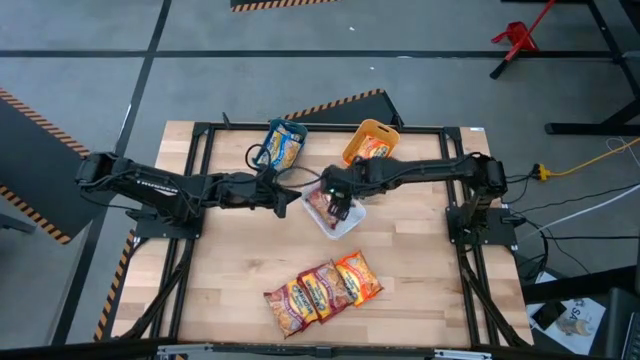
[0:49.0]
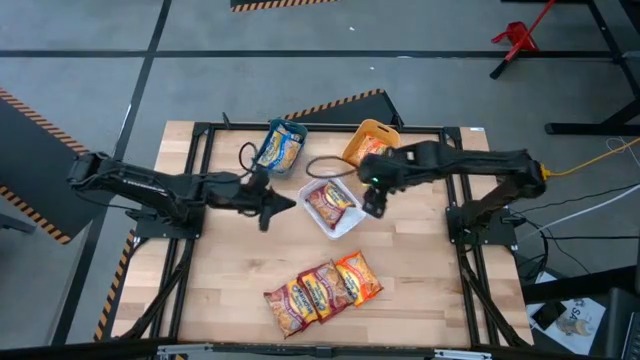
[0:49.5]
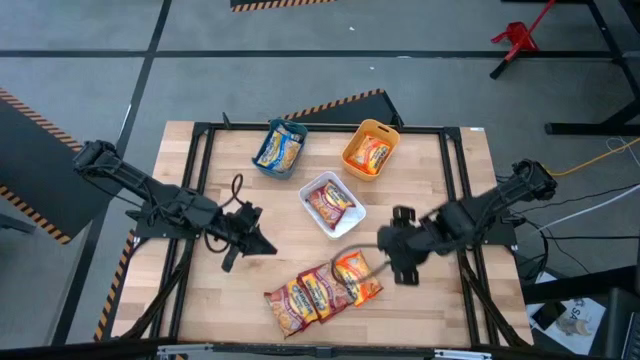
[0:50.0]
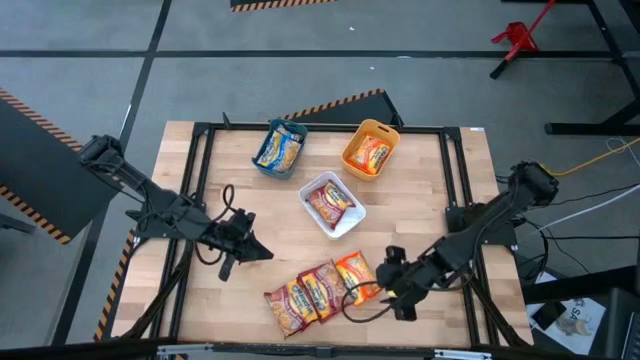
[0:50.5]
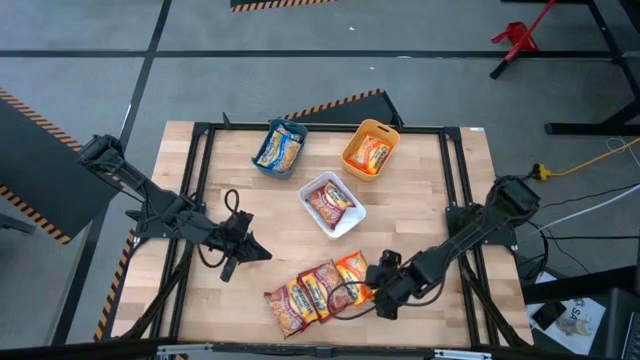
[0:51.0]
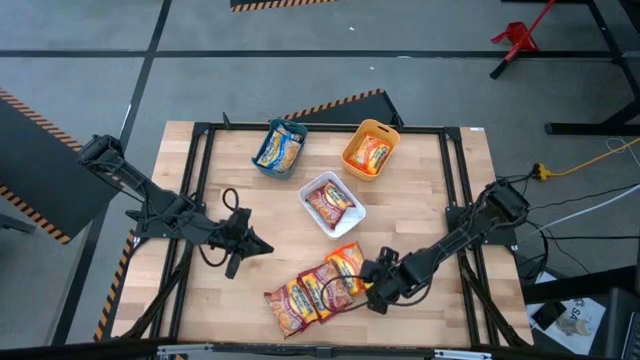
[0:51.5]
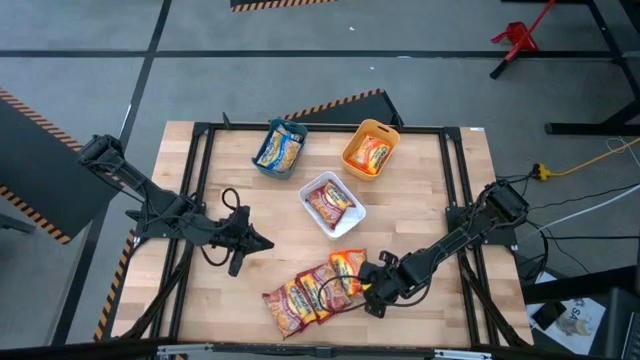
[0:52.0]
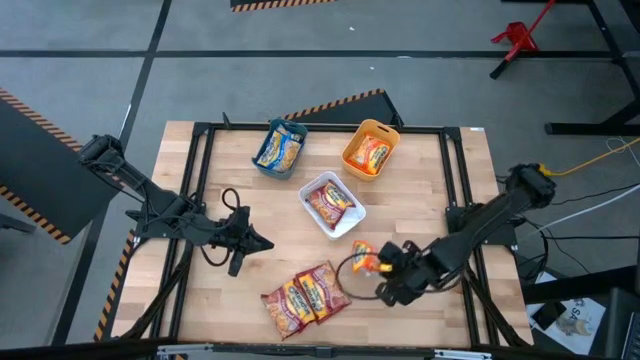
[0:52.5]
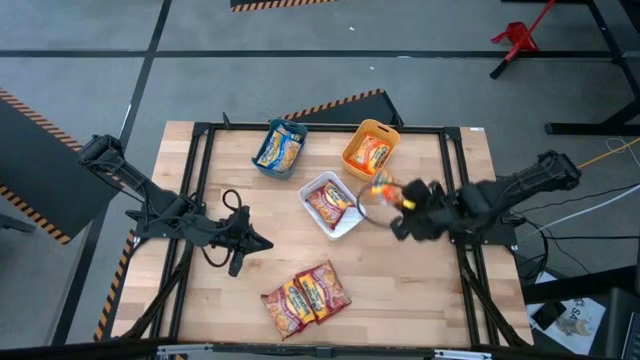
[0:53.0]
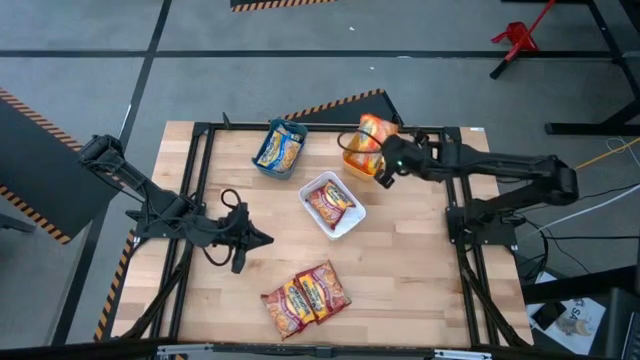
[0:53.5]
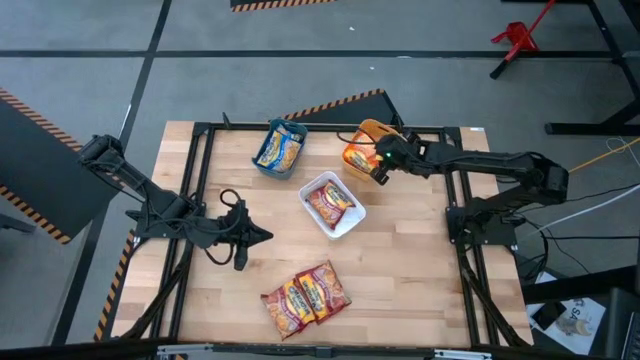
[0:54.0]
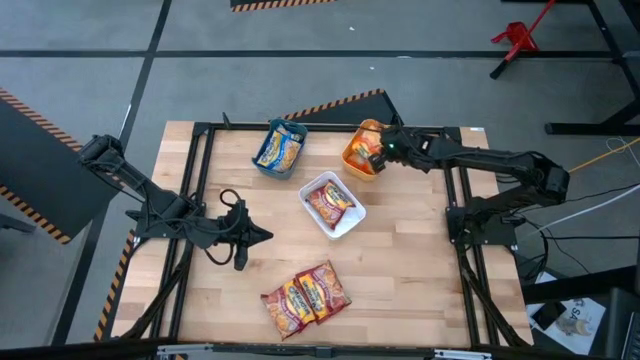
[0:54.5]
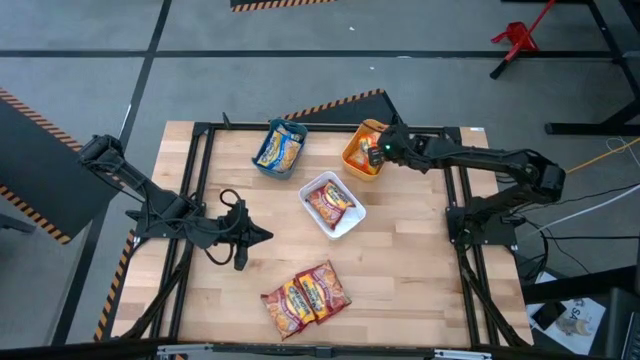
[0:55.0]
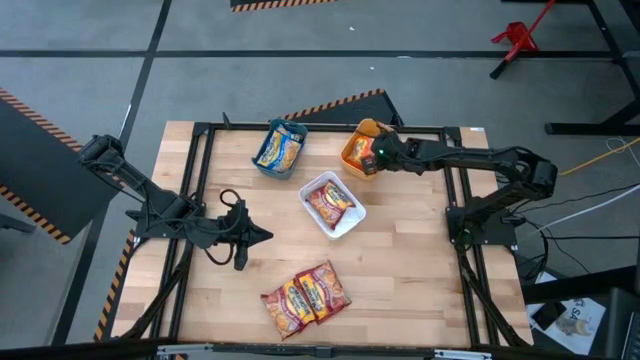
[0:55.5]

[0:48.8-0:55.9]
Task: Sort Maruchan noodles
Put the orange noodle pack into the yellow bin

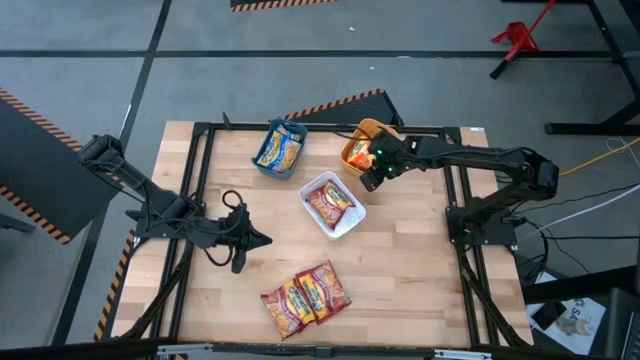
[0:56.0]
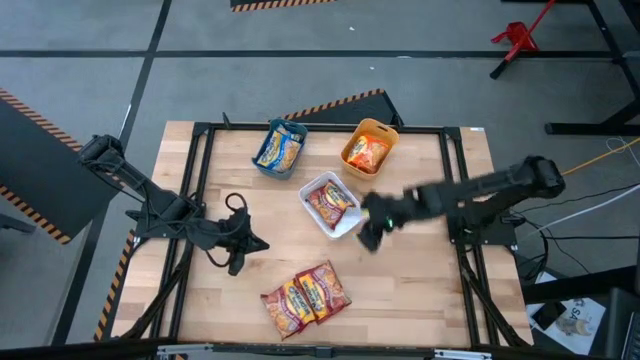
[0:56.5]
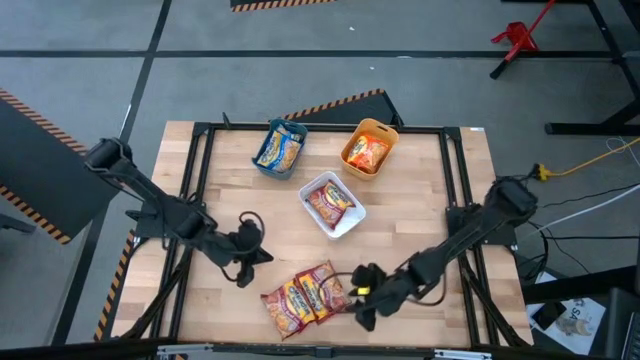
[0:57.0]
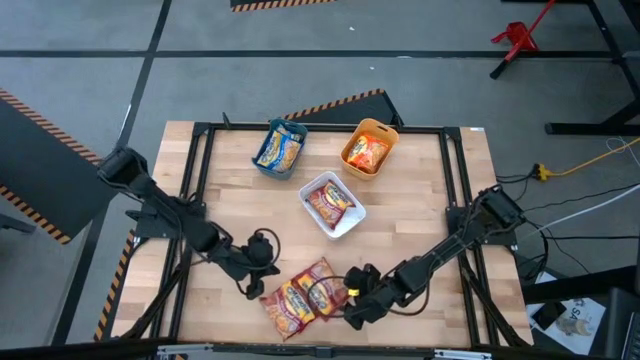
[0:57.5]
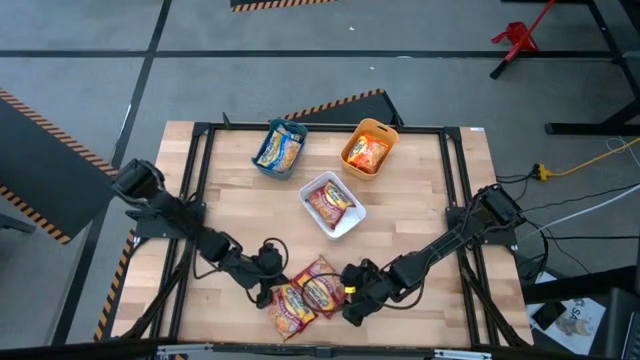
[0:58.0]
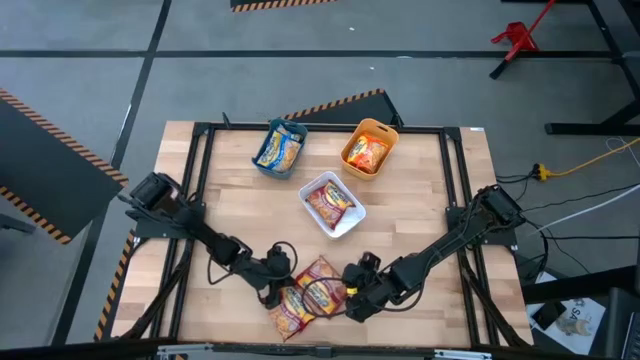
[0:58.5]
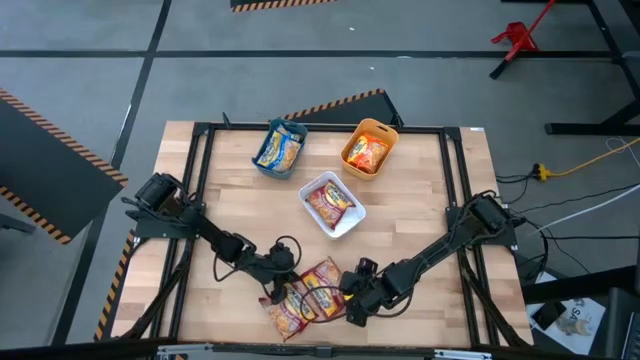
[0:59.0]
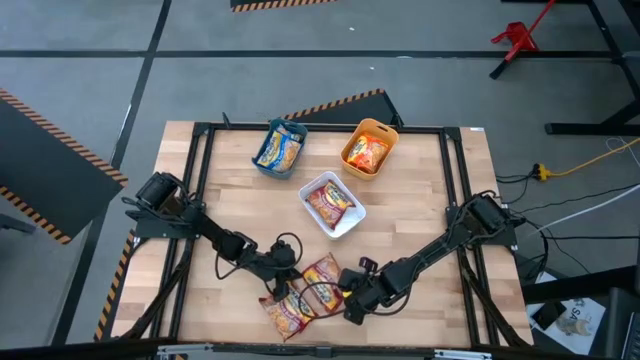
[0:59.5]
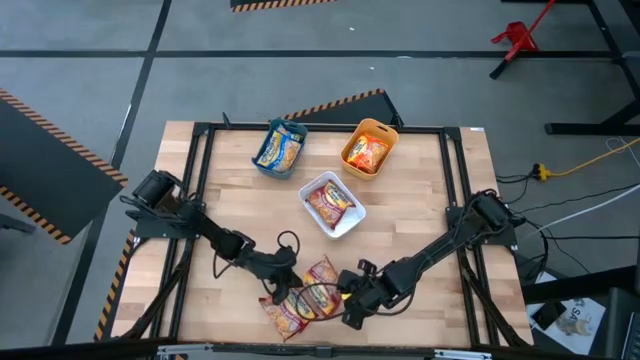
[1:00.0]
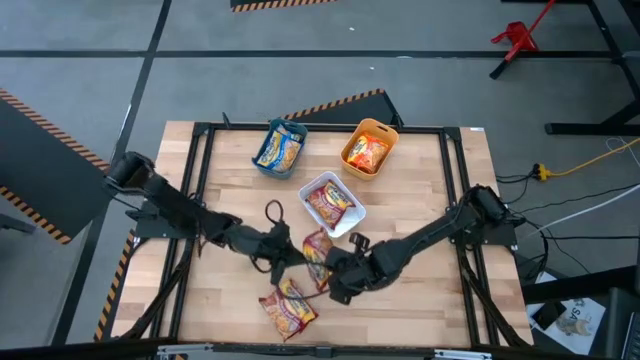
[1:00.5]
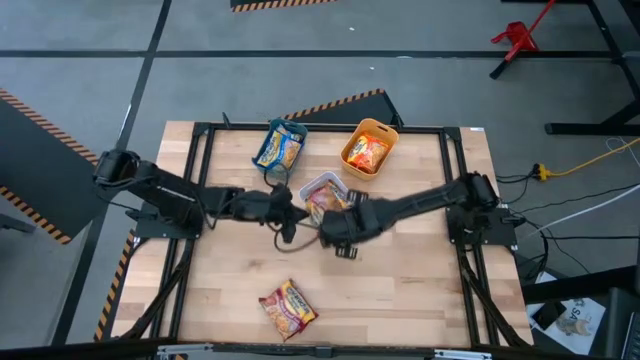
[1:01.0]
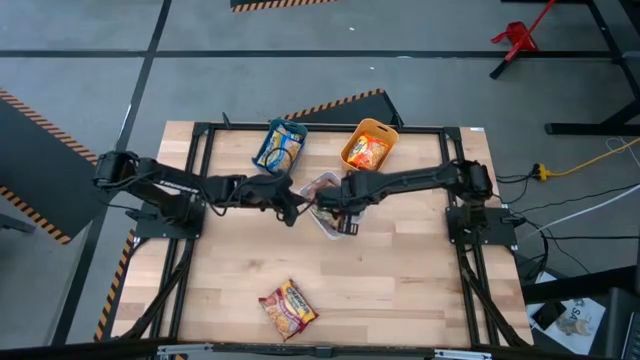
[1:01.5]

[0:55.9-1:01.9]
Put the right red noodle pack into the white bin

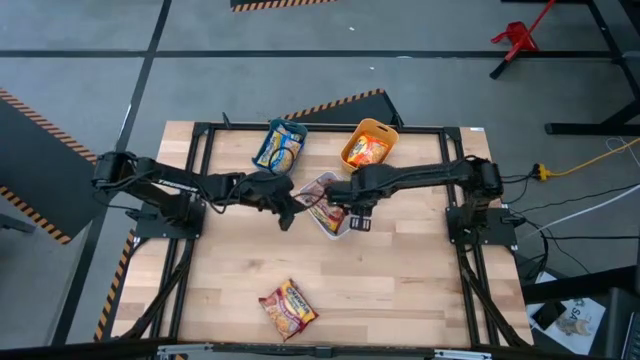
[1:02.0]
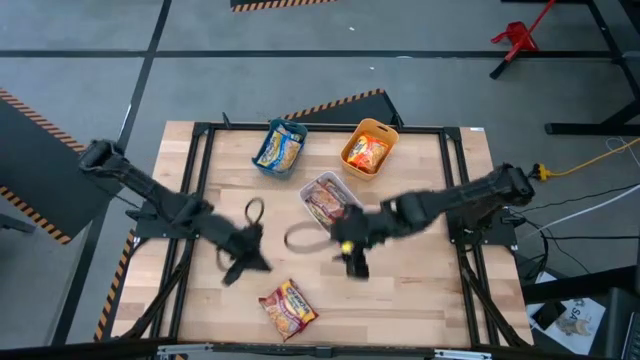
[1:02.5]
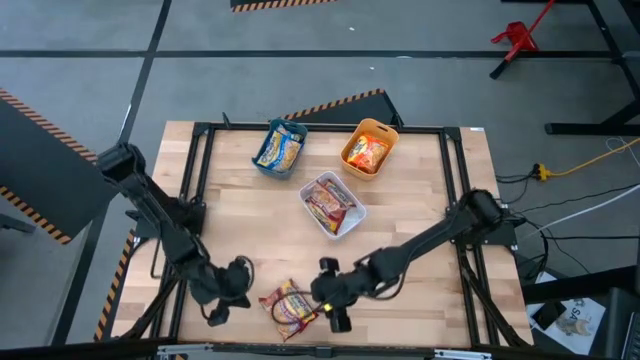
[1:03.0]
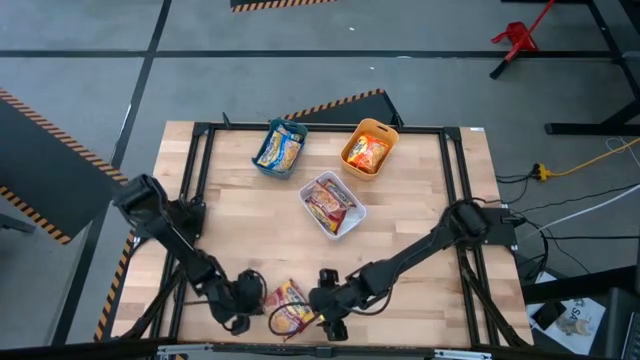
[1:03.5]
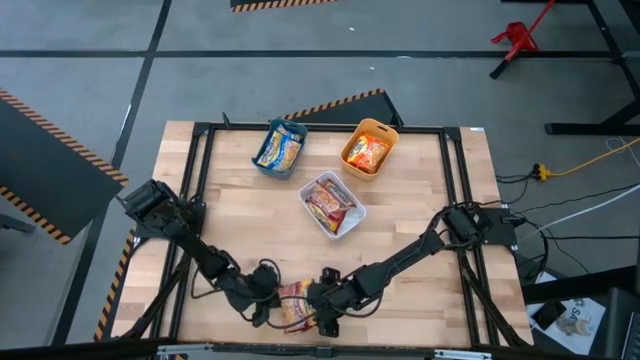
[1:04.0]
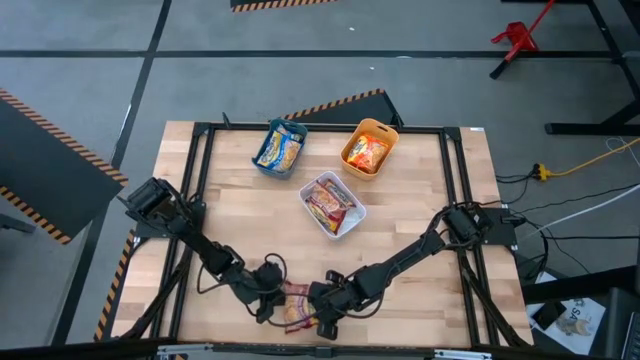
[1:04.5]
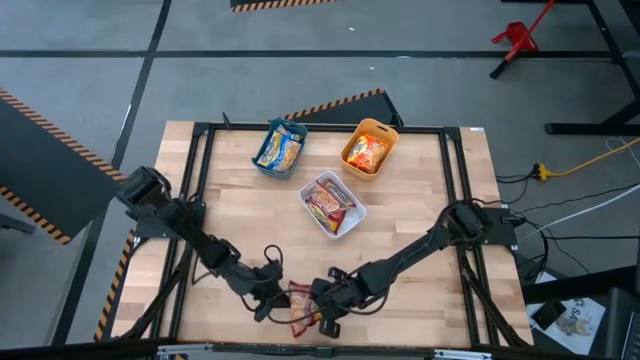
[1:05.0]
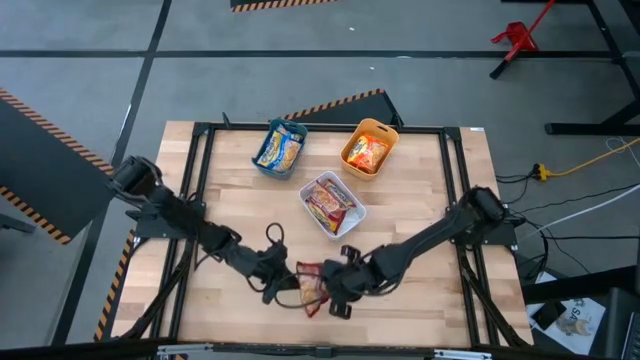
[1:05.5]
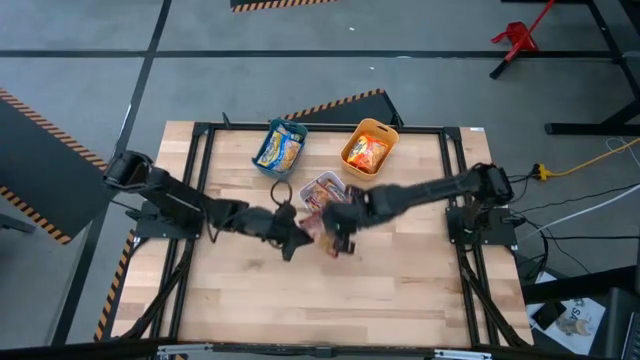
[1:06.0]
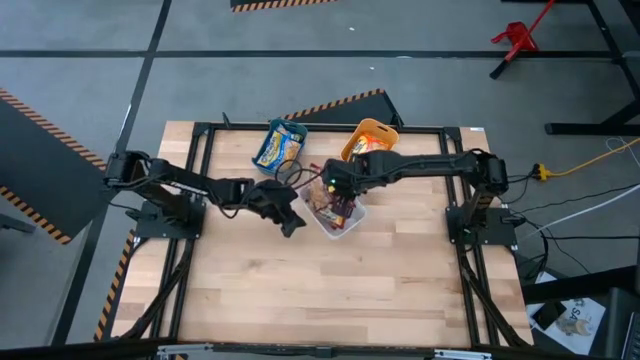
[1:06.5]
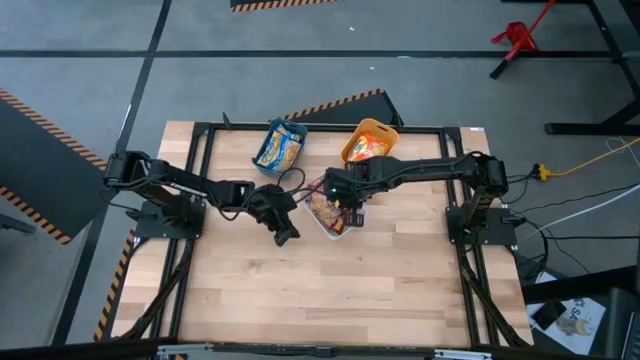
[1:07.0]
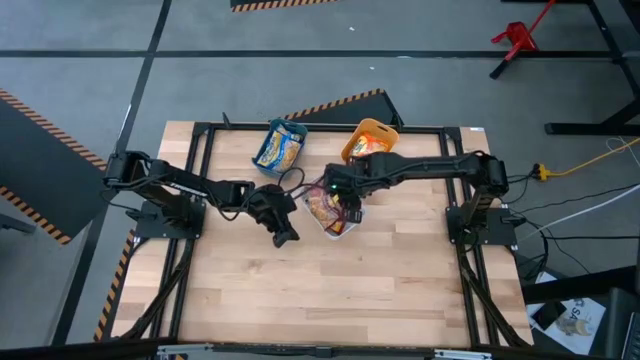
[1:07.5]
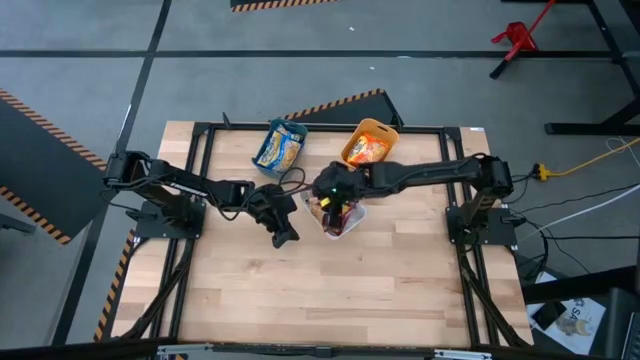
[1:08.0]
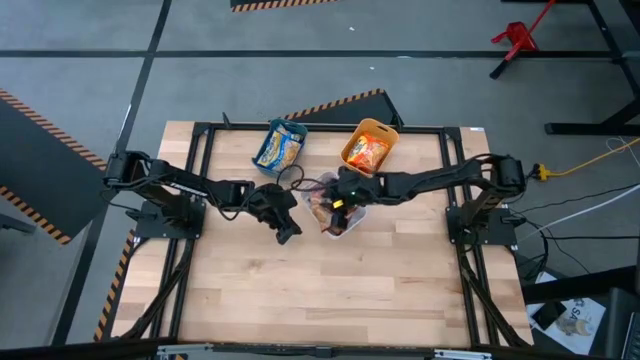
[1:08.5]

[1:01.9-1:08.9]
Put the red noodle pack into the white bin

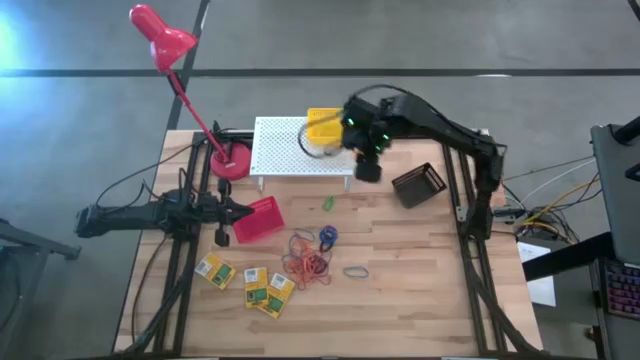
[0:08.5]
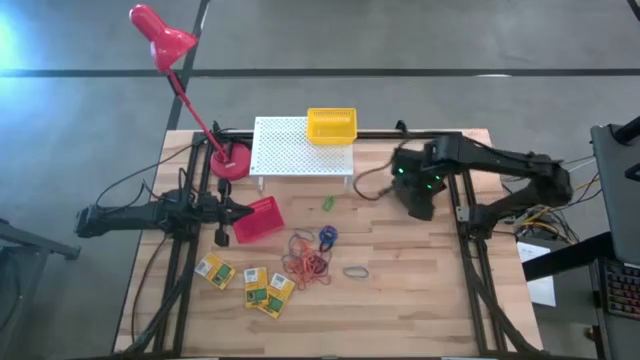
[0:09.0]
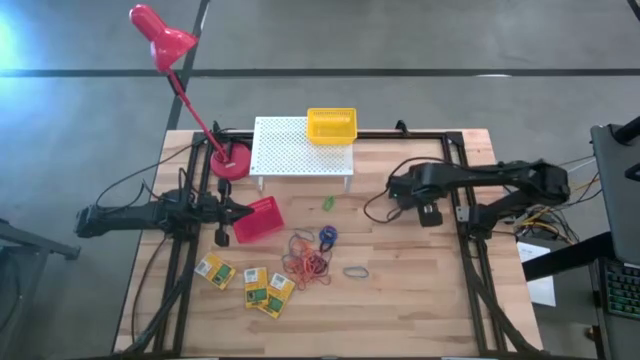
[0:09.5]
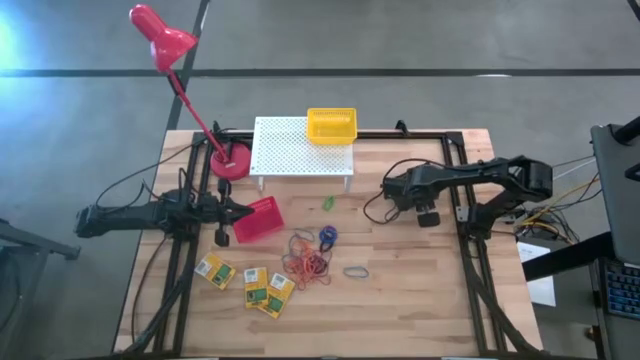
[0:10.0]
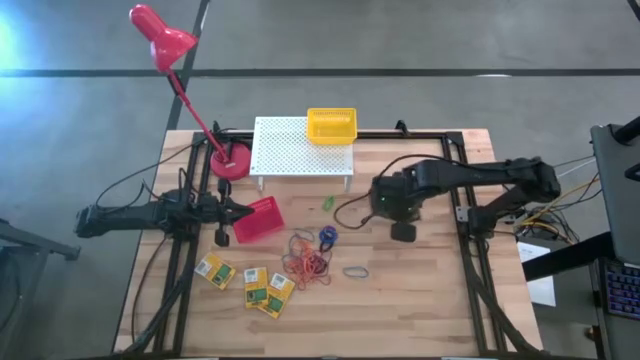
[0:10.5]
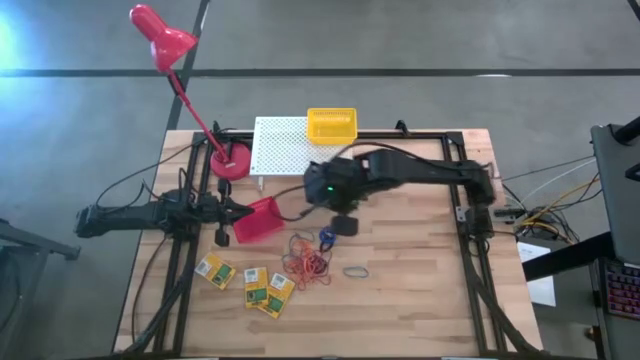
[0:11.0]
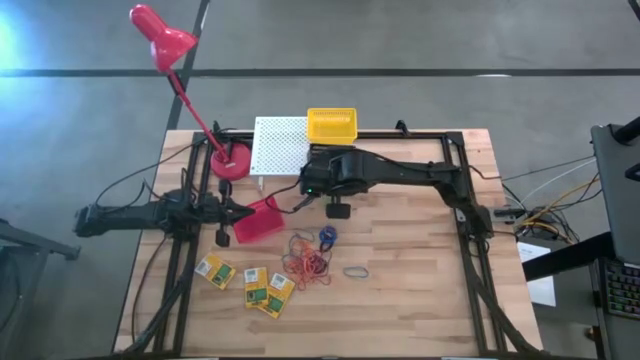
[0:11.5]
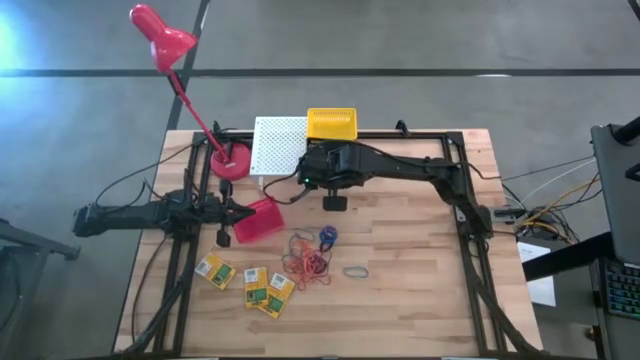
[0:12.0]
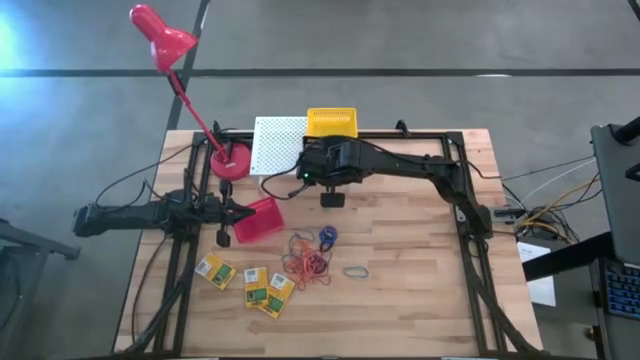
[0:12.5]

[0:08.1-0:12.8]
Task: Pick & Place Office Desk Supplies
Put the black bin on the shelf
